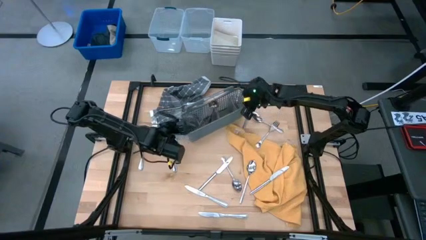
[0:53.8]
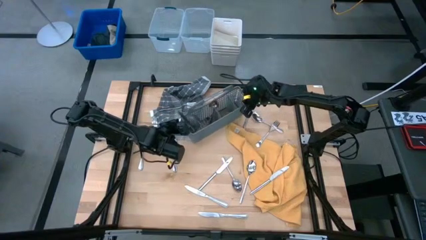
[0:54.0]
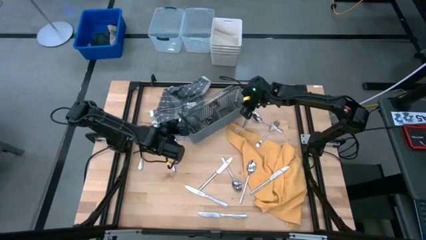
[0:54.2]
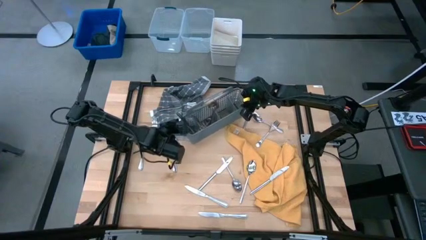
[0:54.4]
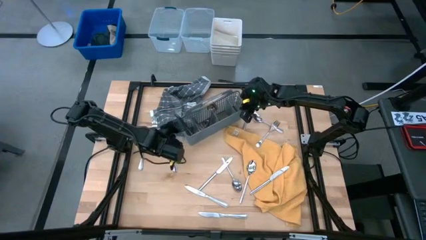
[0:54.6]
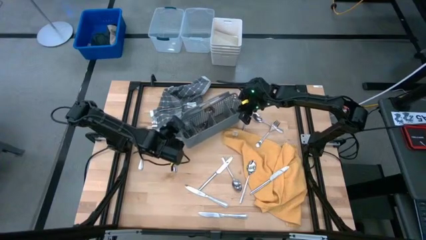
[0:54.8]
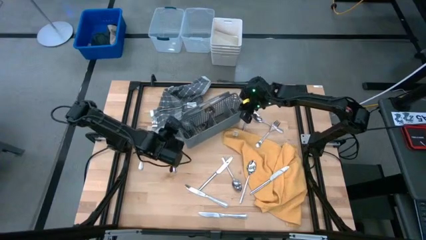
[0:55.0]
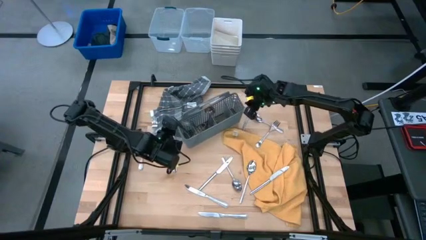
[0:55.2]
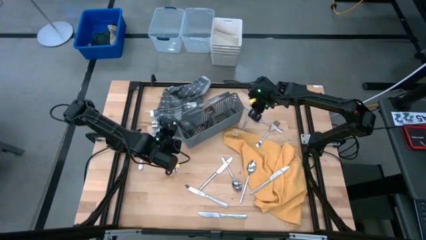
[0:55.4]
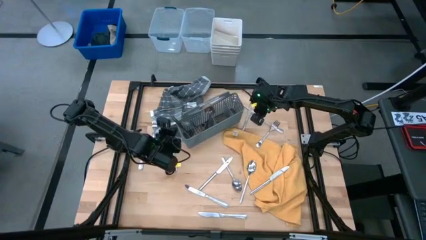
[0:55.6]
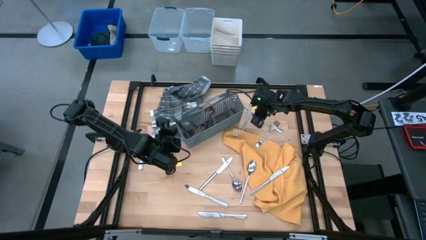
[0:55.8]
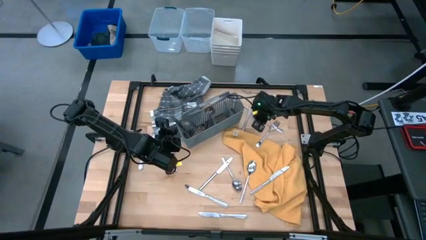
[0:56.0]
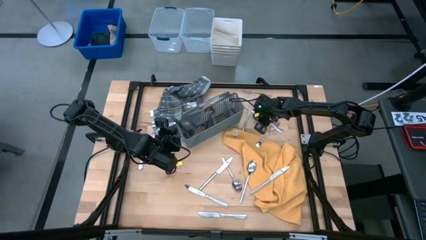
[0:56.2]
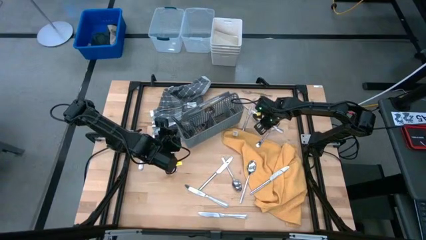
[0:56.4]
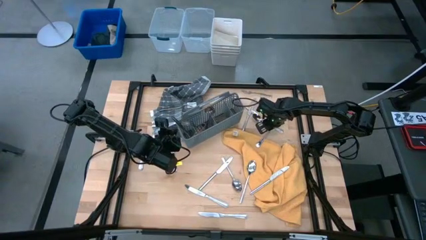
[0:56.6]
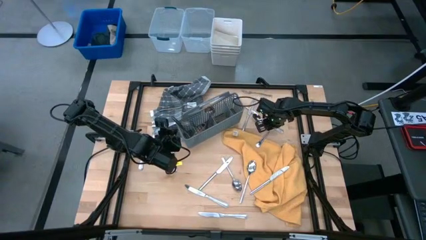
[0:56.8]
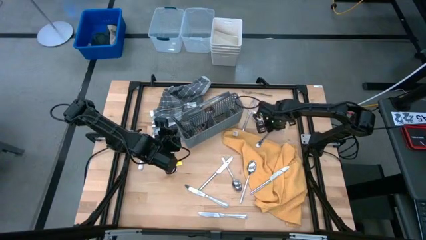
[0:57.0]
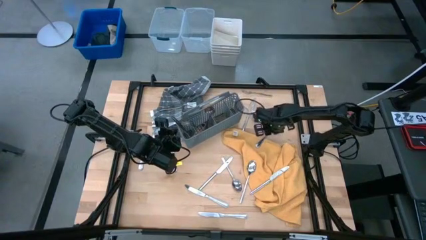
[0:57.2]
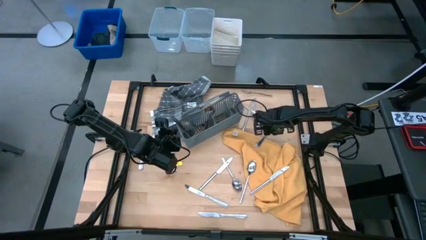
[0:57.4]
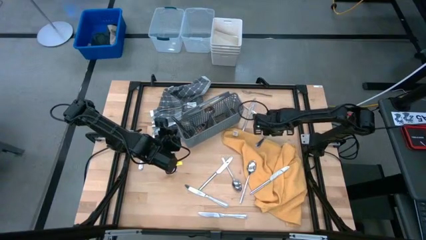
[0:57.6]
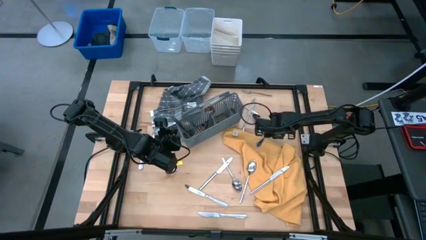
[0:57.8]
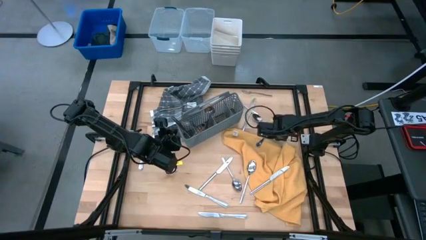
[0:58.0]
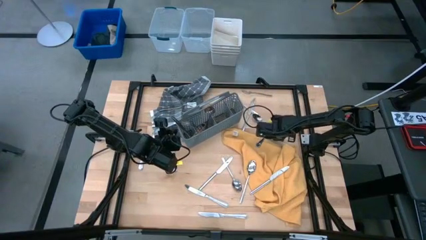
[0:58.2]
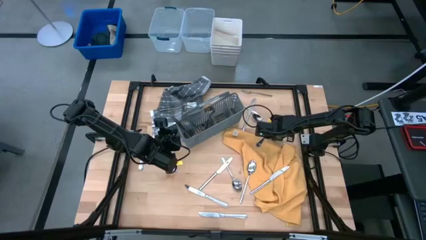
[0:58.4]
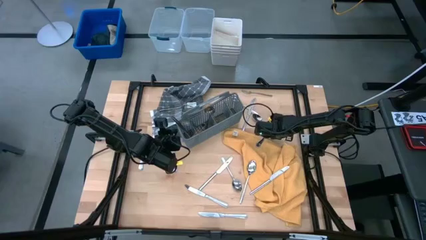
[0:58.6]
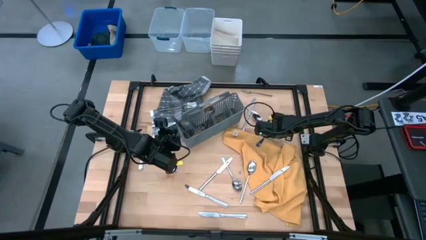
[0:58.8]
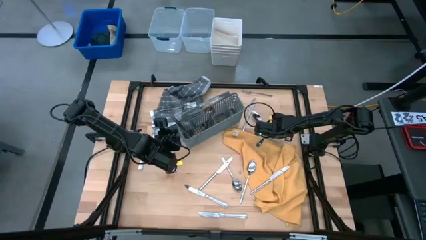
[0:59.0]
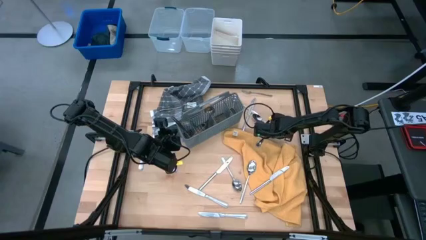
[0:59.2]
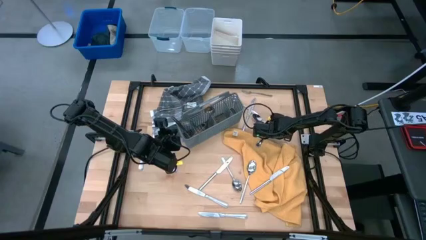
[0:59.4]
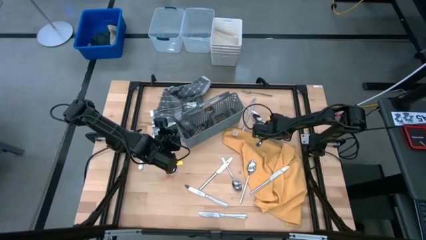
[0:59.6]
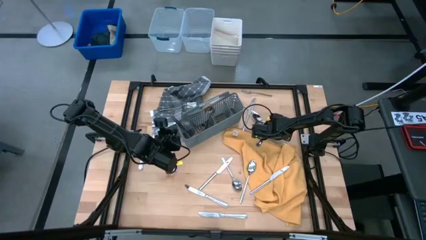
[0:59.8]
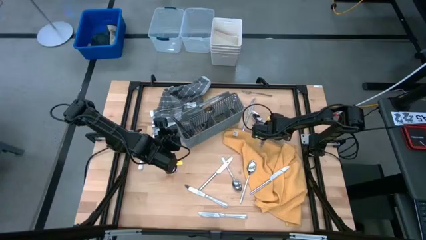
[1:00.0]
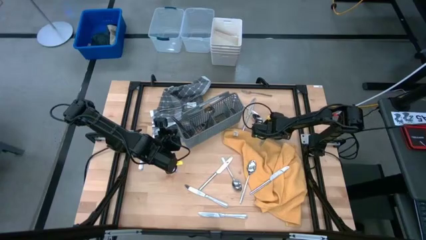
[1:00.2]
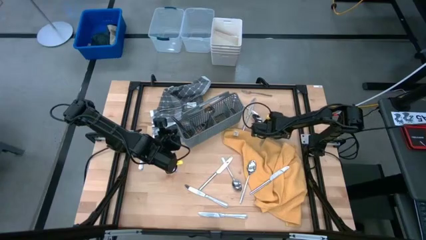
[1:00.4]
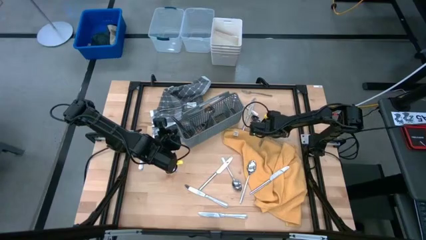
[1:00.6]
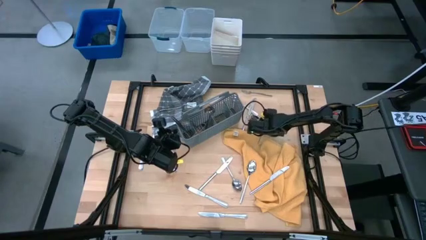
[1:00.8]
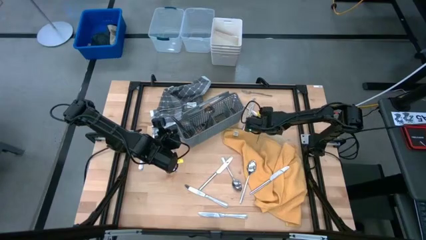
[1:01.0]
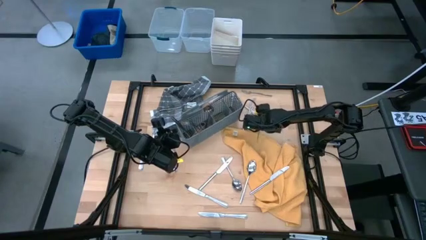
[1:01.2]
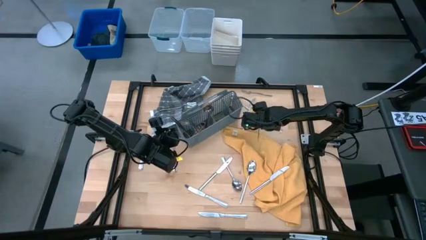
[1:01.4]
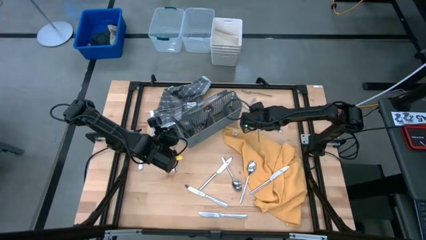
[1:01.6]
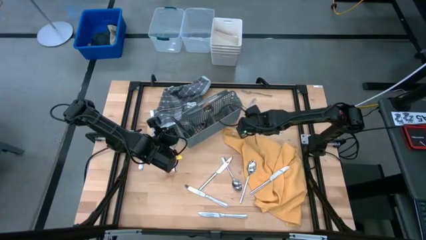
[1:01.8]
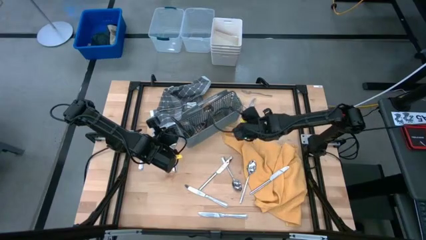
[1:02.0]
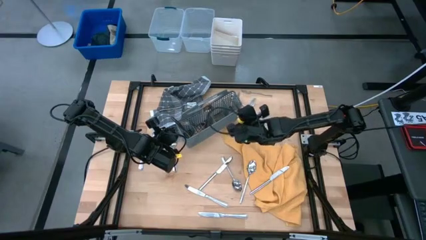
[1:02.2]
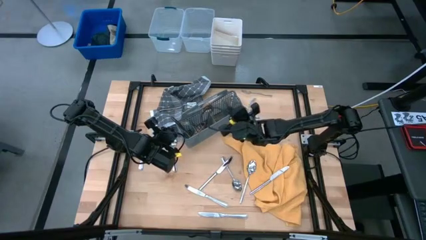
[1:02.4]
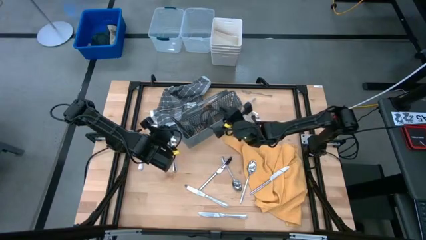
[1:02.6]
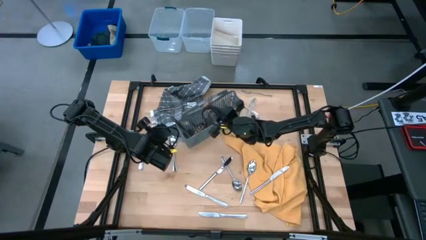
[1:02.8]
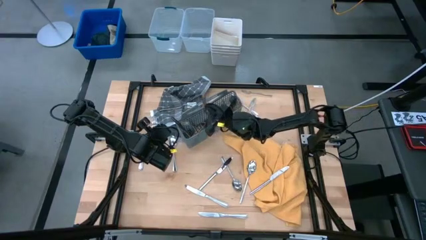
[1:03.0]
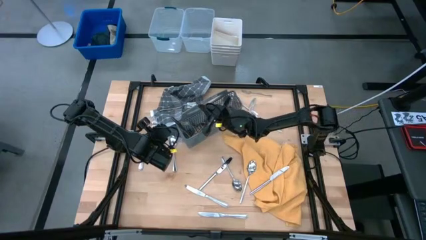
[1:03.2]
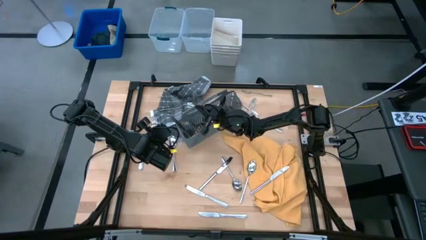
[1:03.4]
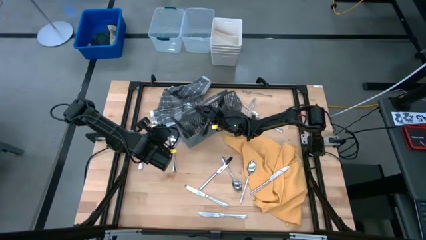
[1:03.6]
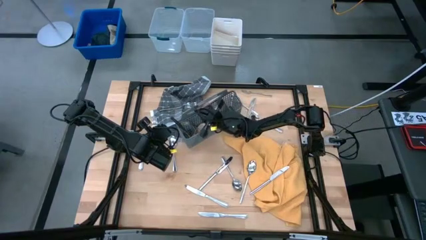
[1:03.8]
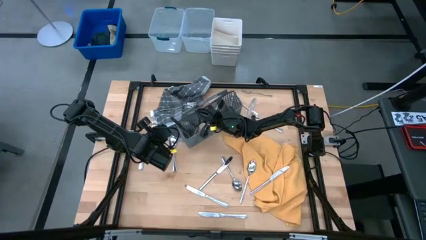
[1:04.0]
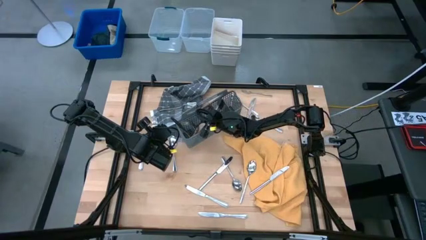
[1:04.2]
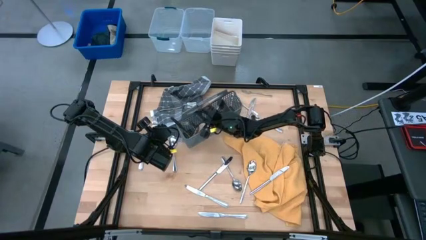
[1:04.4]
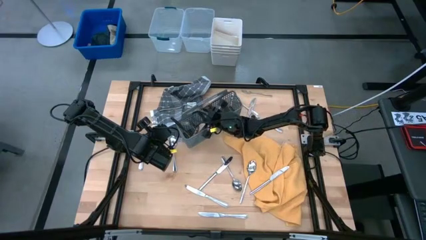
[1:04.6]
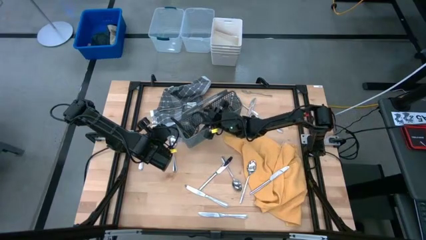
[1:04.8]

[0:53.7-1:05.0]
Task: Sort silverware
Put the silver knife into the gray silverware basket

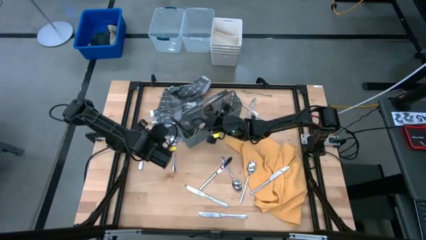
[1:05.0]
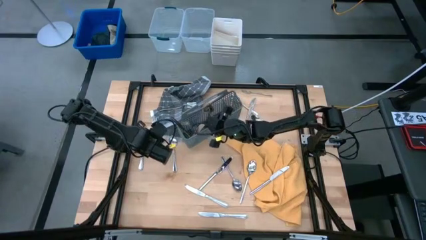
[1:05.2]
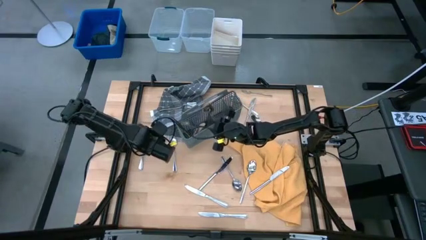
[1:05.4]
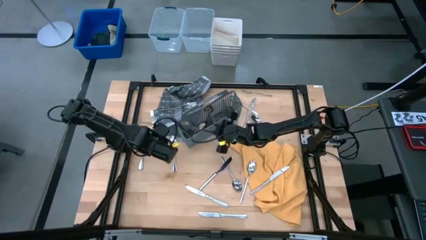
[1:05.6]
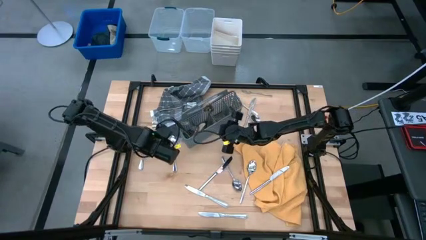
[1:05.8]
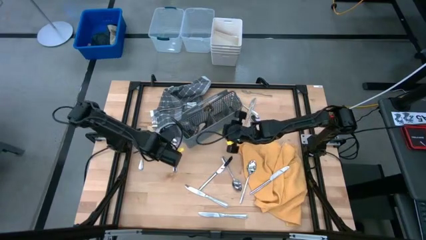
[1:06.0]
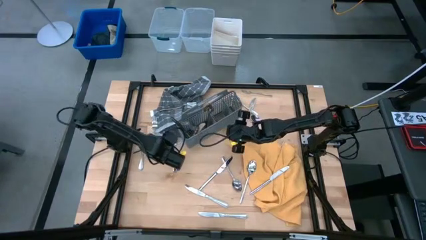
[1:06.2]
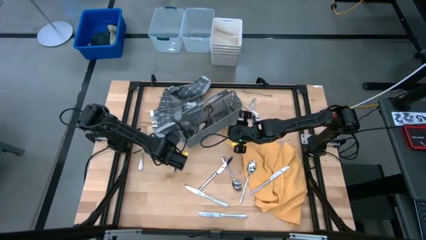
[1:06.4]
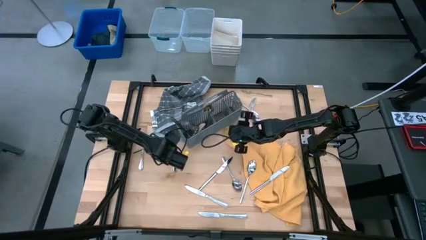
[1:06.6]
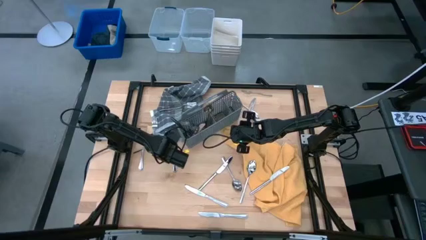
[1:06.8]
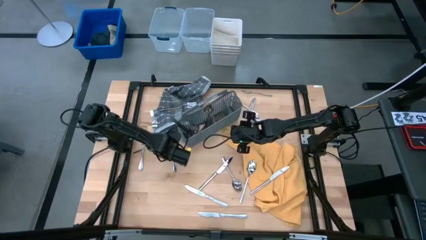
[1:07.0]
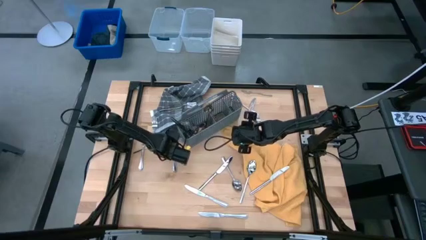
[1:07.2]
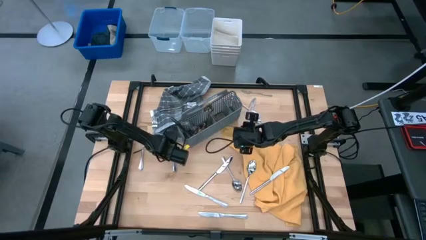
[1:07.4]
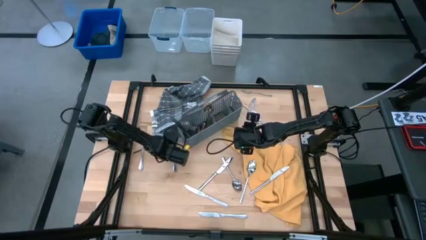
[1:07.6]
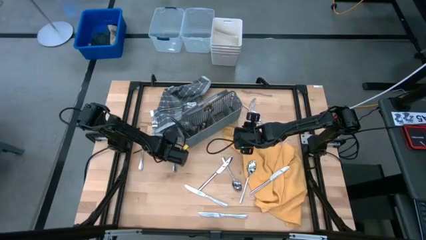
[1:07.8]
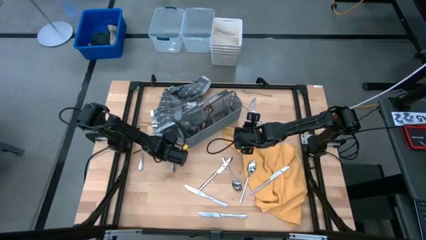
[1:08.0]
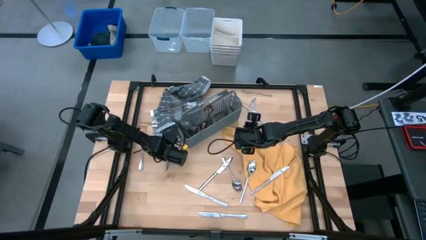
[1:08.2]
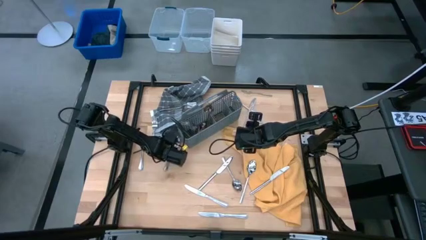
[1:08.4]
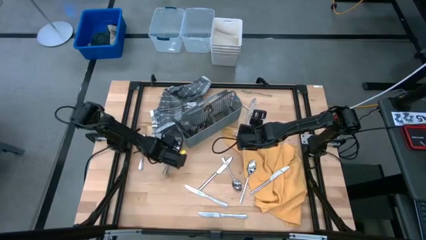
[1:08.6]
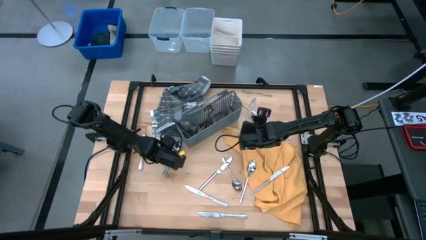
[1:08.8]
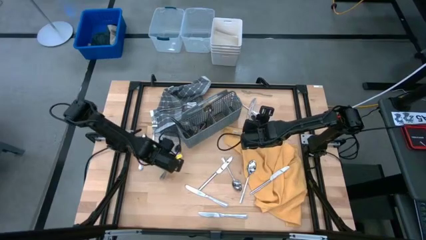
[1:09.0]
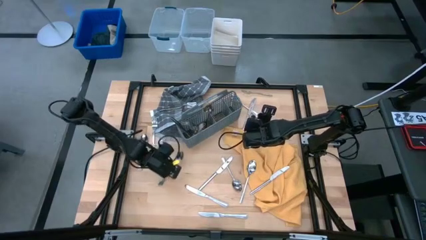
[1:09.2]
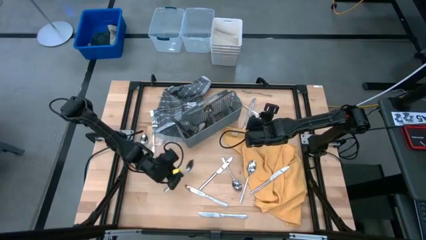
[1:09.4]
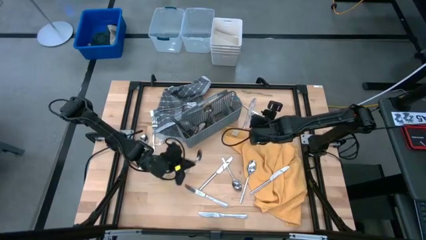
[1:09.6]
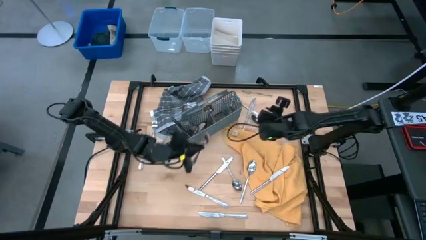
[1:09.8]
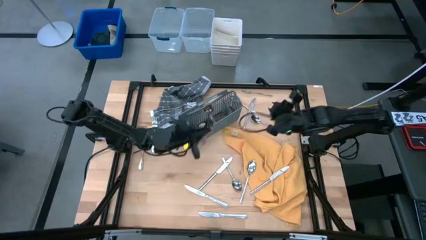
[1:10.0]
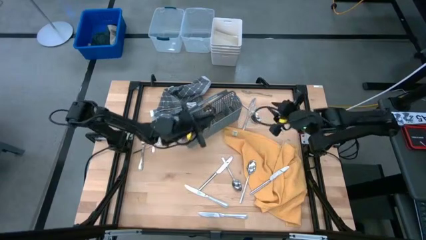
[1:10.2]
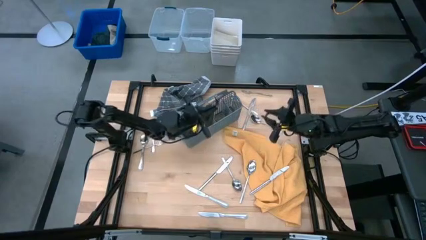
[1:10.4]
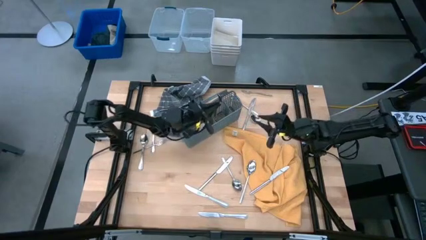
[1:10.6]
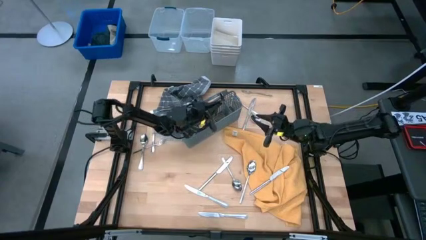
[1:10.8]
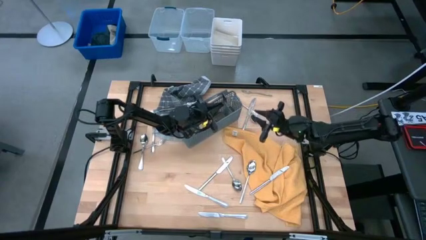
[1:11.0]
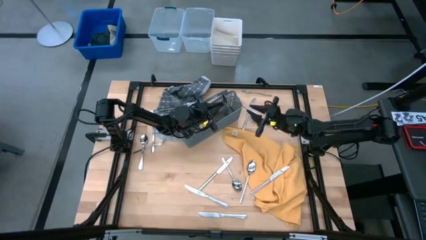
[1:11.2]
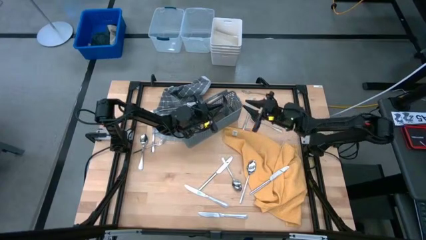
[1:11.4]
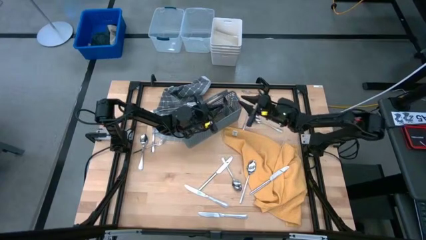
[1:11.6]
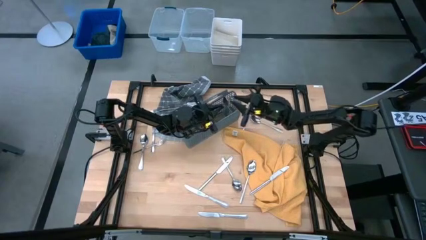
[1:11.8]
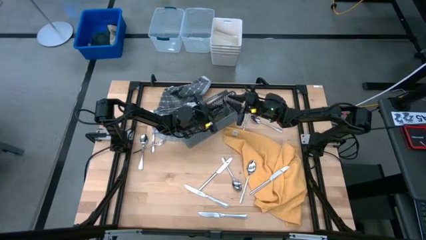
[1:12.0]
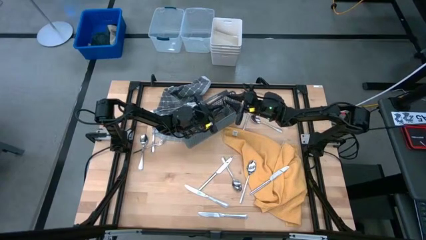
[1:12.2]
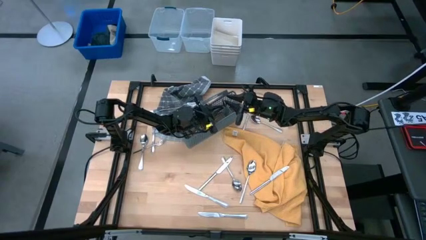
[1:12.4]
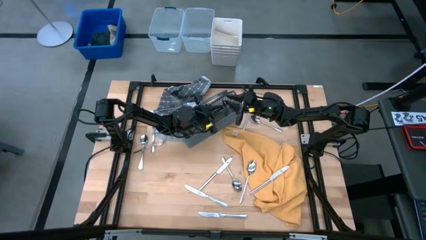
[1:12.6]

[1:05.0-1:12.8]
Put the silver spoon into the gray silverware basket
